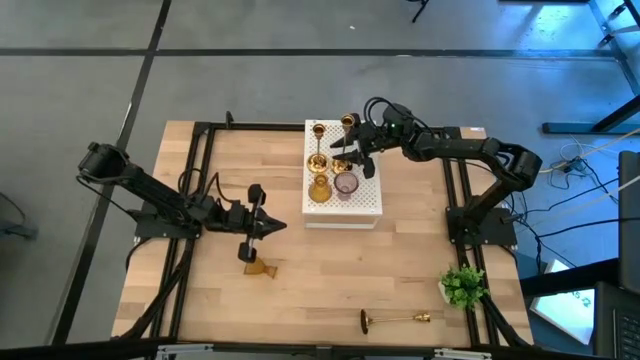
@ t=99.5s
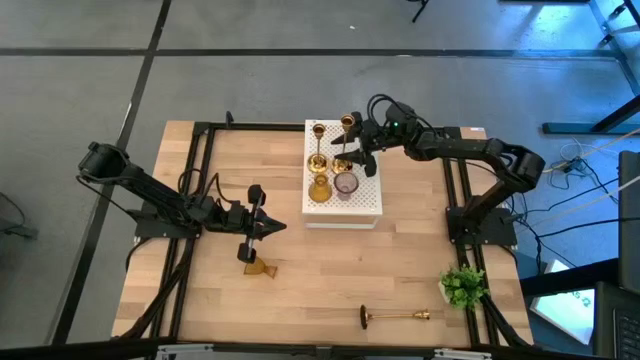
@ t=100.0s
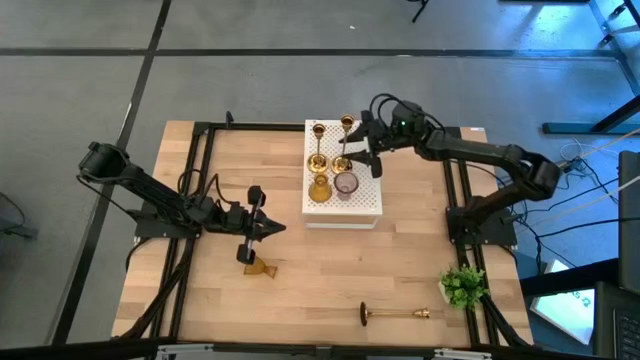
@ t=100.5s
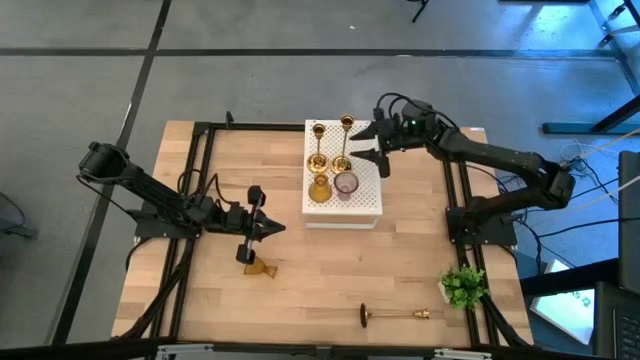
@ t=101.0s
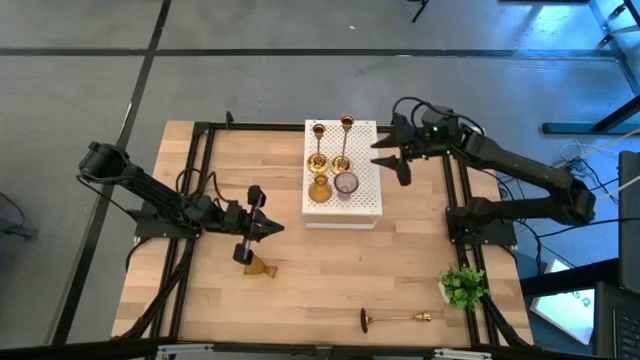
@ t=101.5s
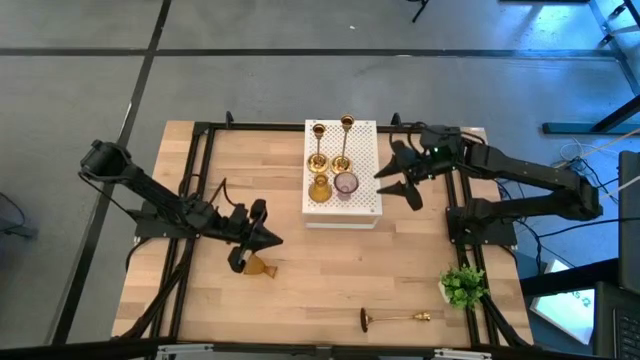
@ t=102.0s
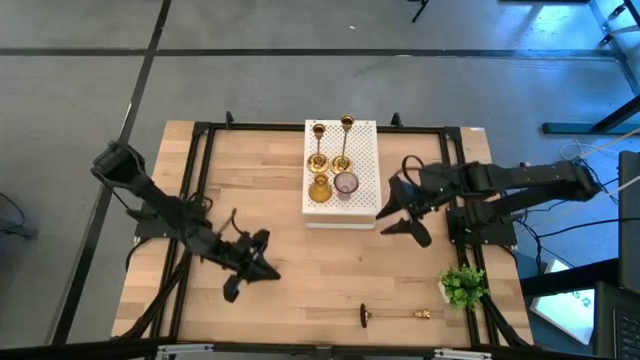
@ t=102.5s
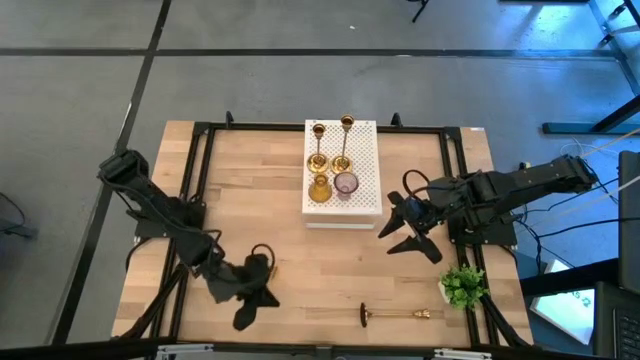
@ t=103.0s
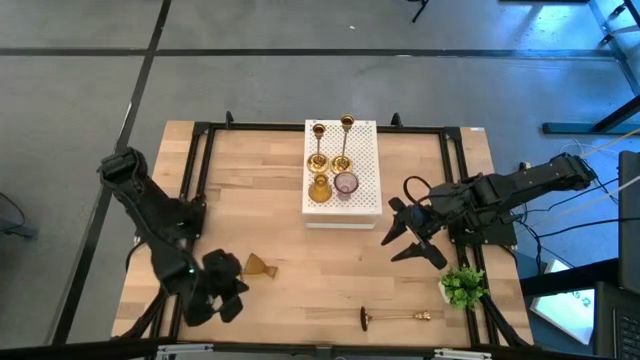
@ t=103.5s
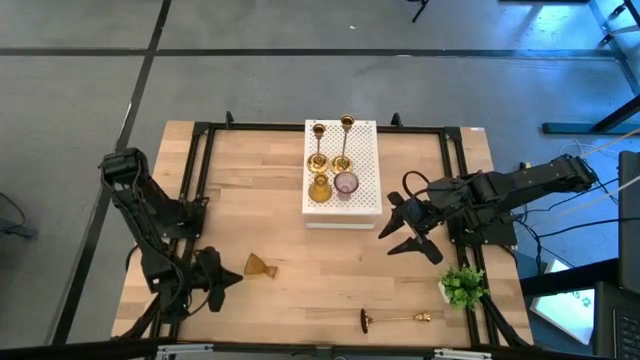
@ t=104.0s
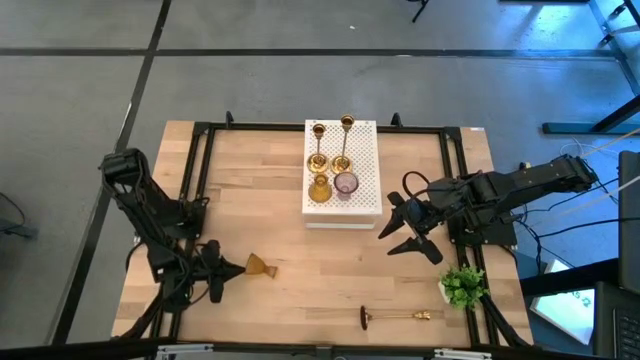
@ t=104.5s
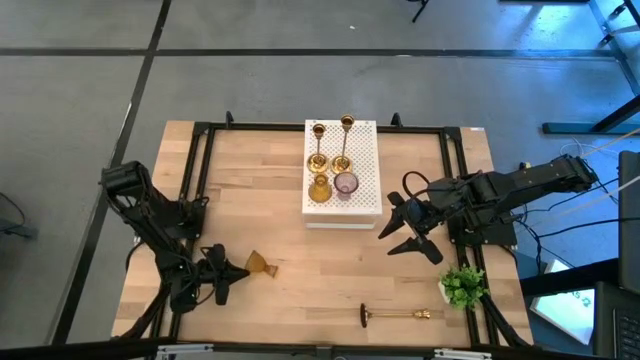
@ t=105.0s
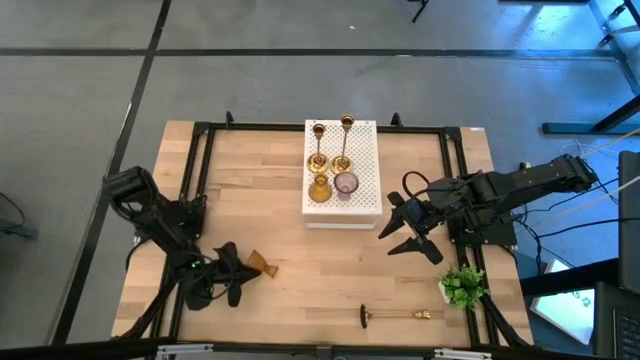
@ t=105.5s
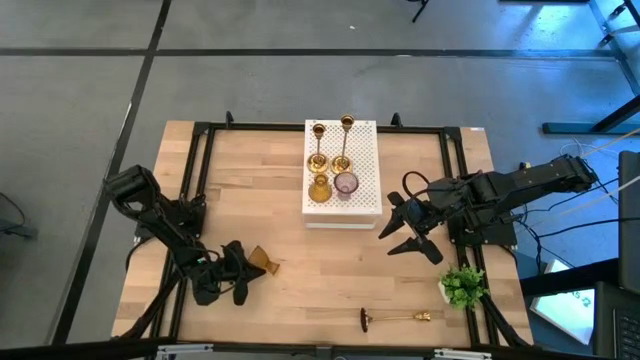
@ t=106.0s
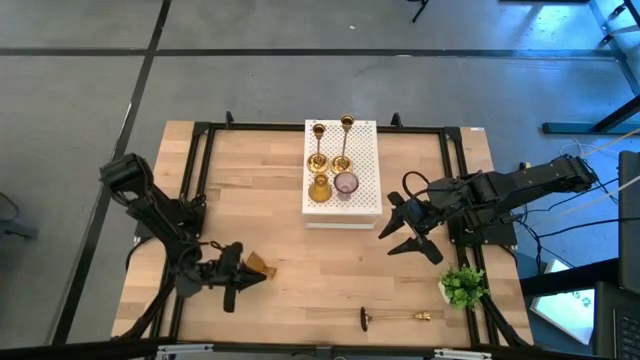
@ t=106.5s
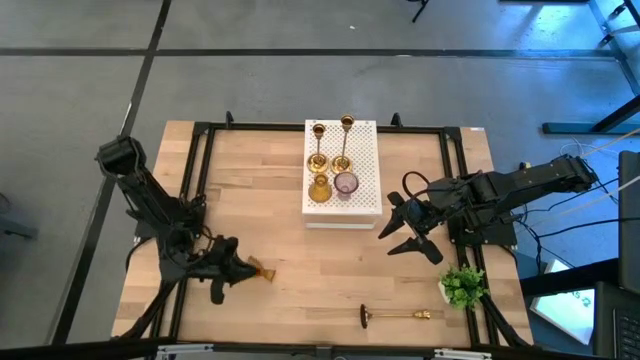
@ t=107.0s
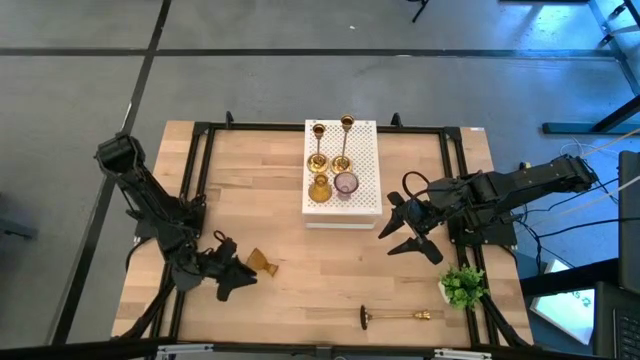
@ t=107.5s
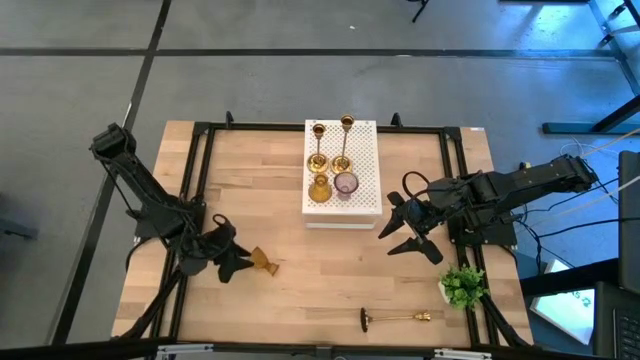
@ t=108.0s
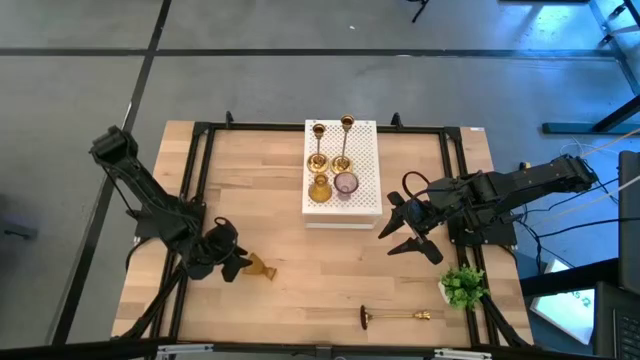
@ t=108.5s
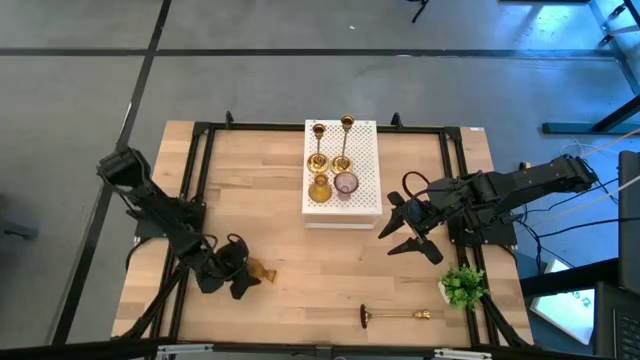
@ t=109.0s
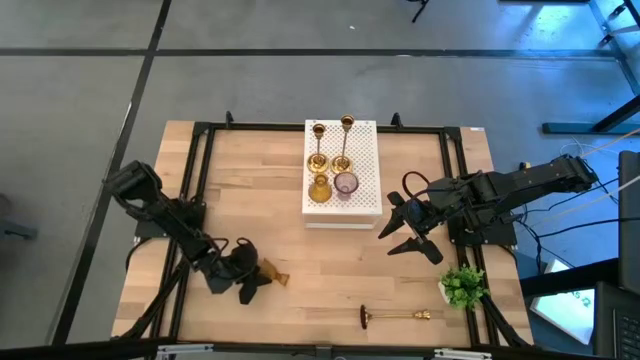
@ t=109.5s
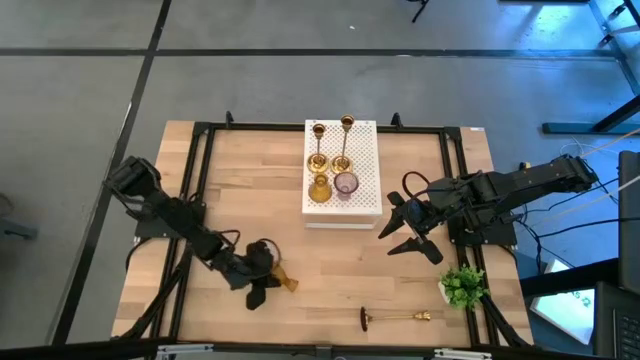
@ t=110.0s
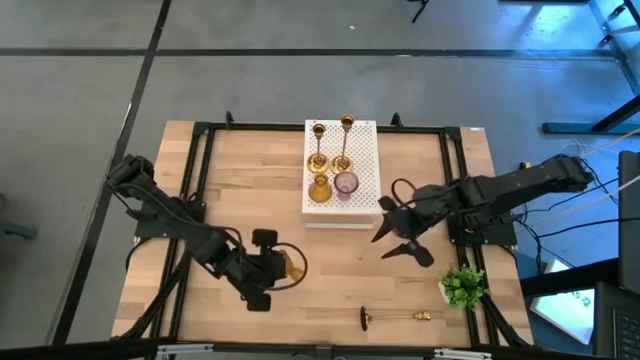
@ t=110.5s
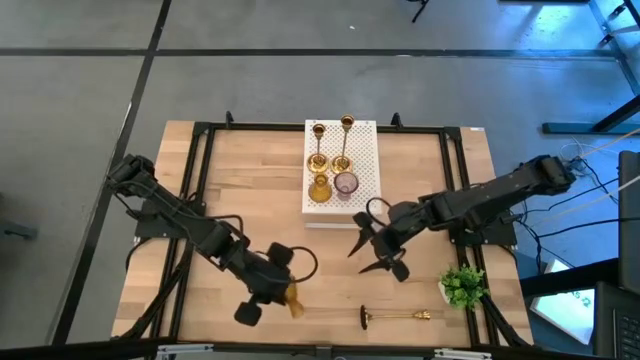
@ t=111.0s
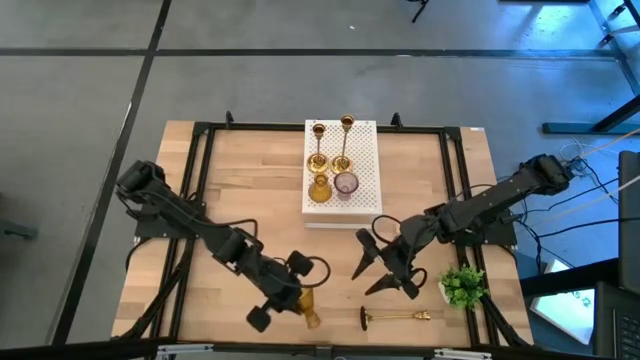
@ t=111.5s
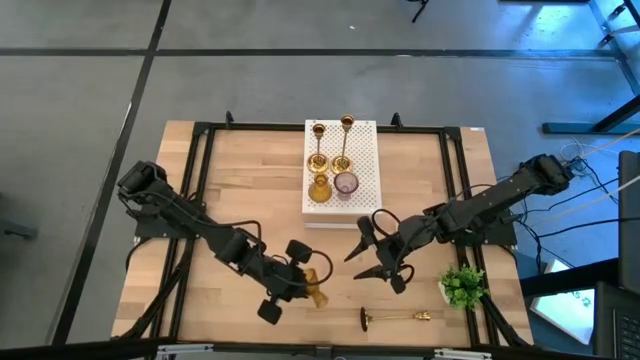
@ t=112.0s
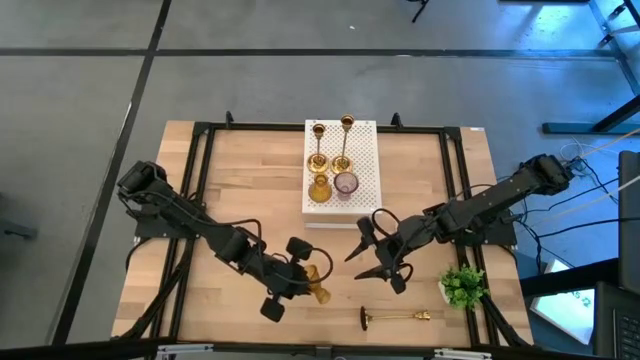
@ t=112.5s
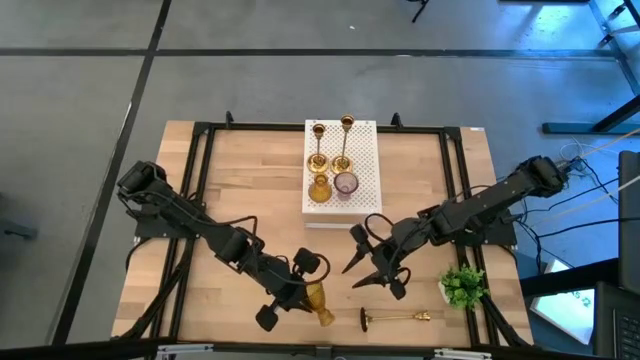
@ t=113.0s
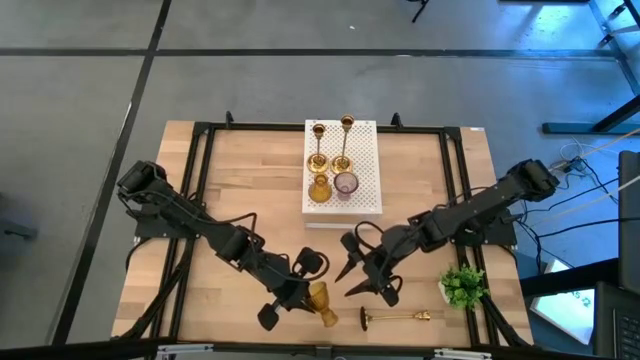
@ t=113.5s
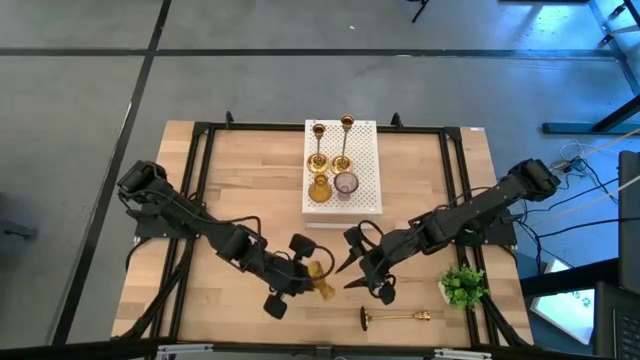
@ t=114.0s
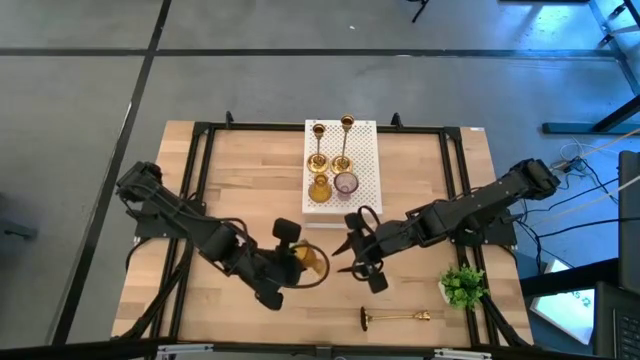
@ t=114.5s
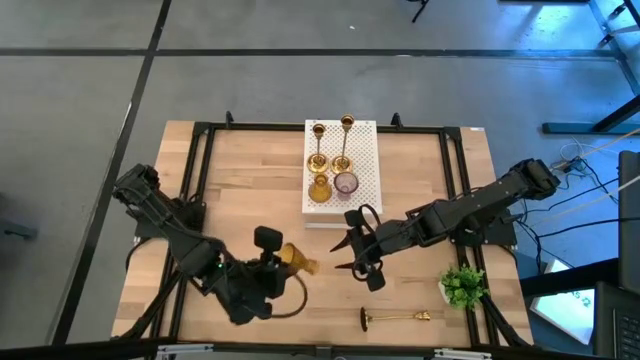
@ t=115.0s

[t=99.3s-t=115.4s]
Task: Pick & Place candle stick holders
Put the yellow glass candlestick holder

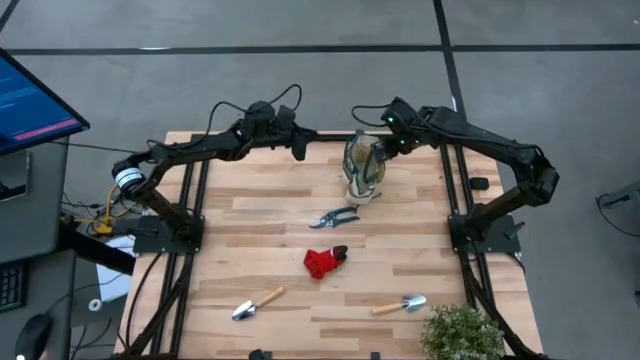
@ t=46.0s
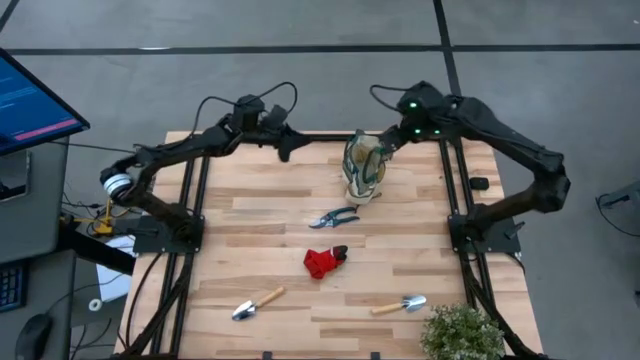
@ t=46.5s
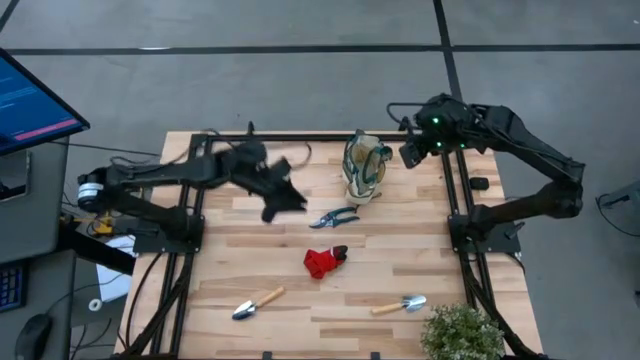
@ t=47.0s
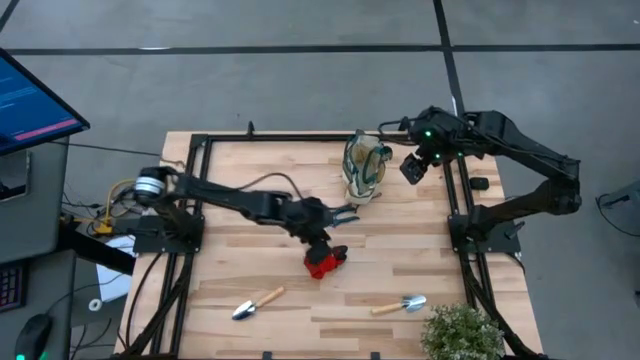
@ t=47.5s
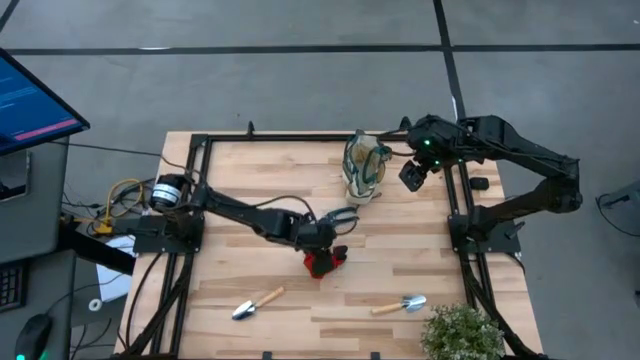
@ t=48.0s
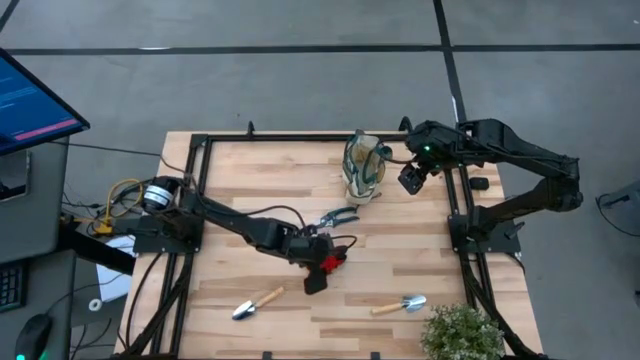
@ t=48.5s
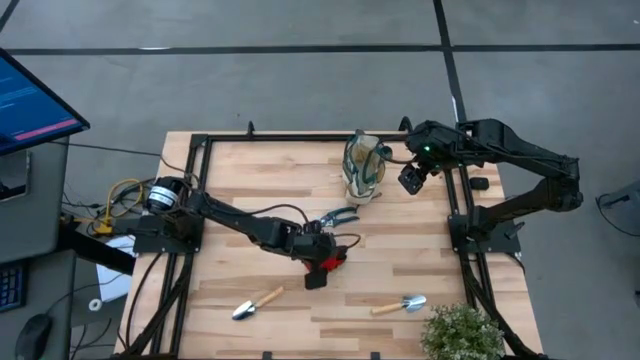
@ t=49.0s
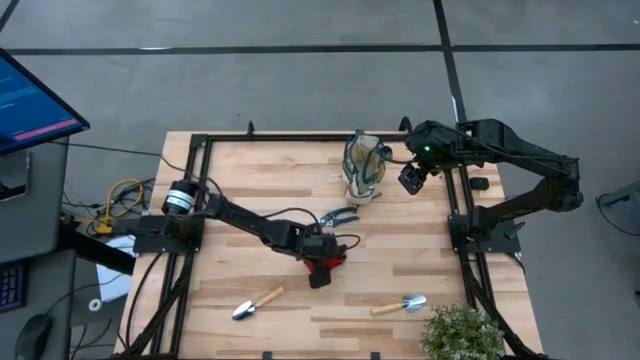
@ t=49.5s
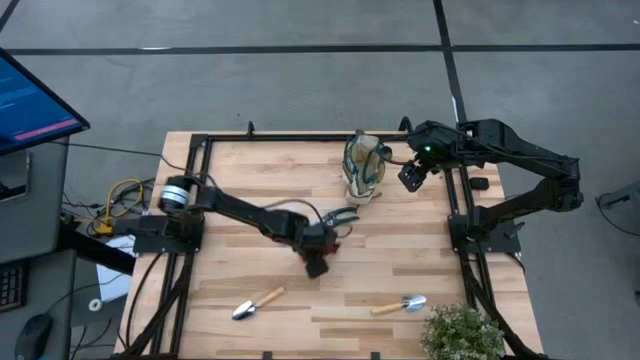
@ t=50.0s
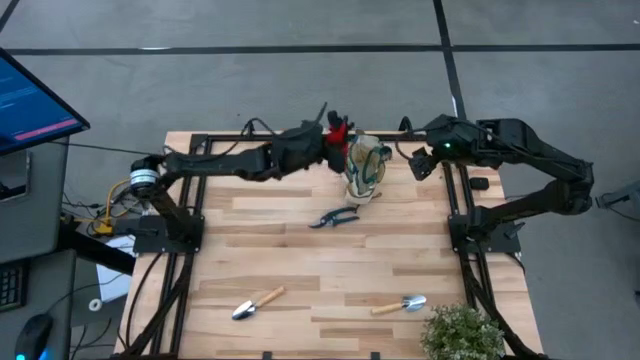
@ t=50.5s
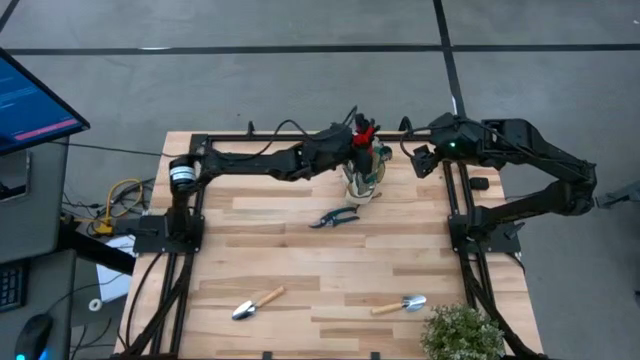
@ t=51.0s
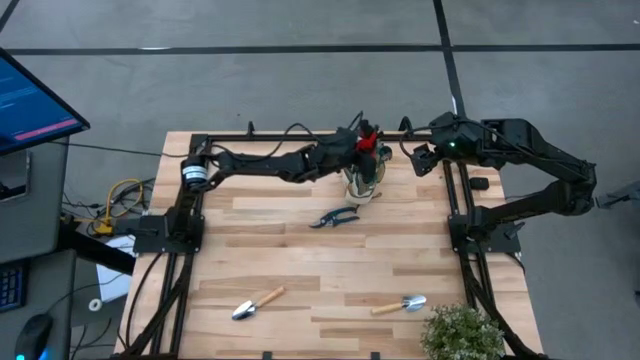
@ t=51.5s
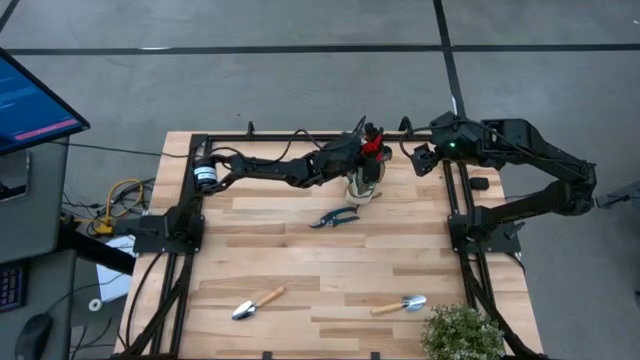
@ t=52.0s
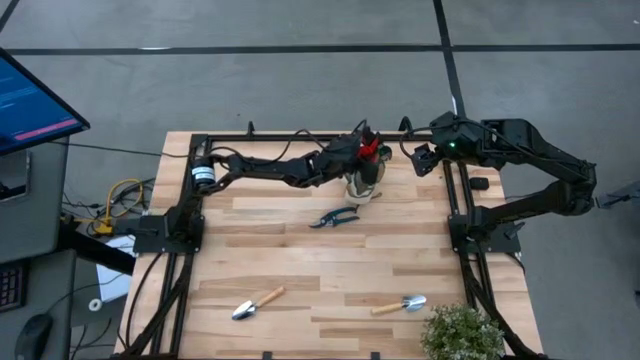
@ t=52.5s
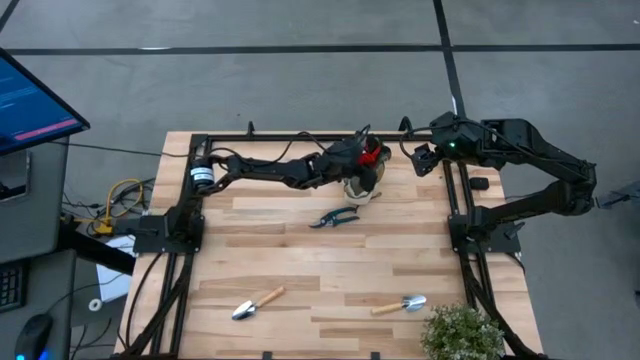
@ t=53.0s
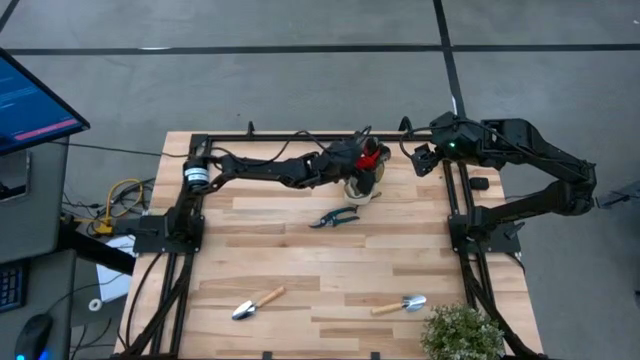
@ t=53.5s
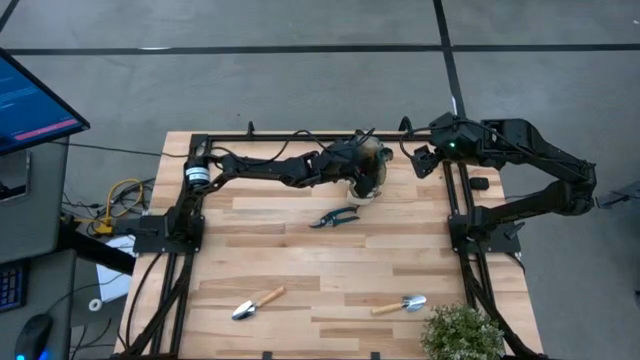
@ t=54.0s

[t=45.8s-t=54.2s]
Task: Pick & Place Garden tools in Gardening bag
Put the gloves into the gardening bag
